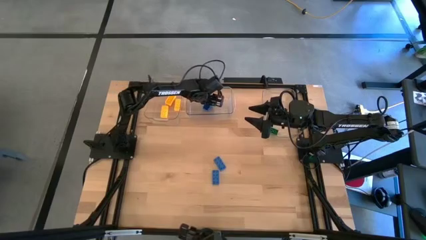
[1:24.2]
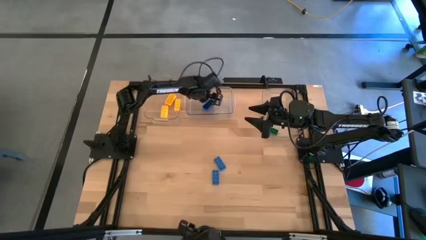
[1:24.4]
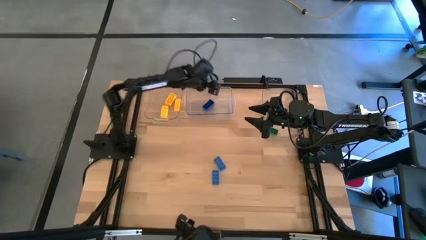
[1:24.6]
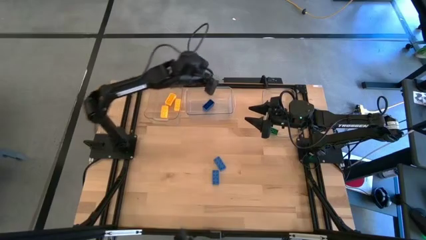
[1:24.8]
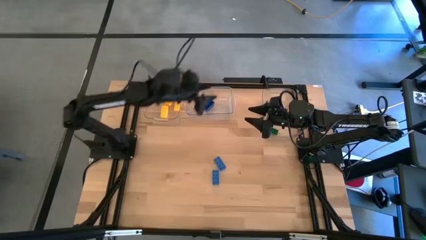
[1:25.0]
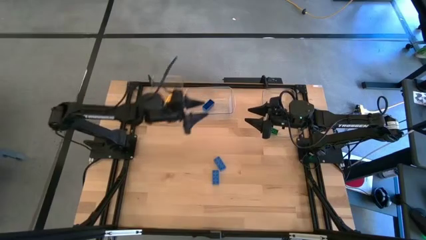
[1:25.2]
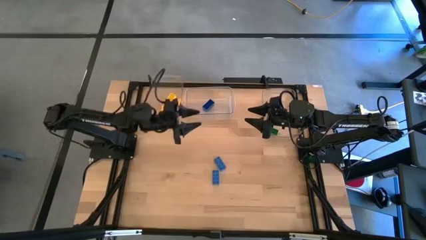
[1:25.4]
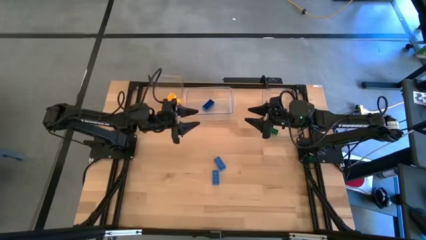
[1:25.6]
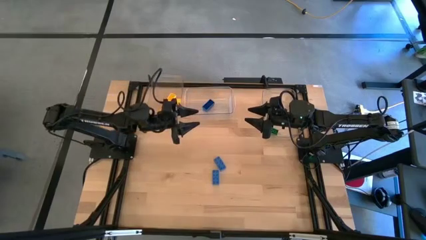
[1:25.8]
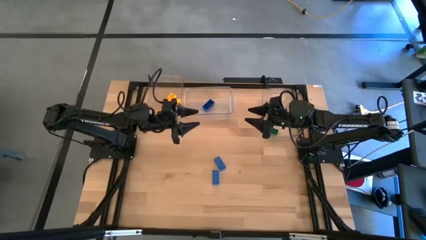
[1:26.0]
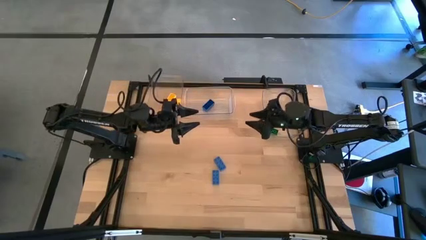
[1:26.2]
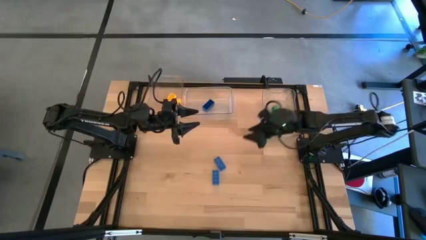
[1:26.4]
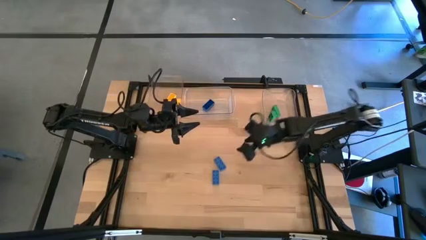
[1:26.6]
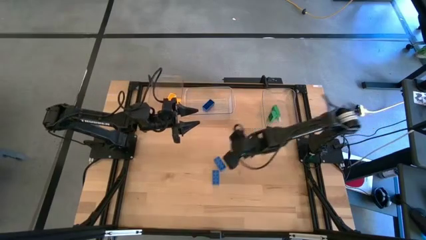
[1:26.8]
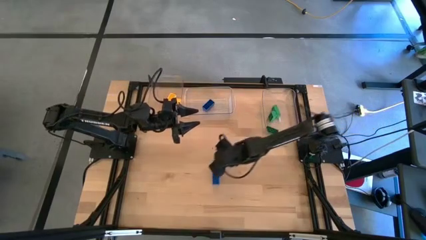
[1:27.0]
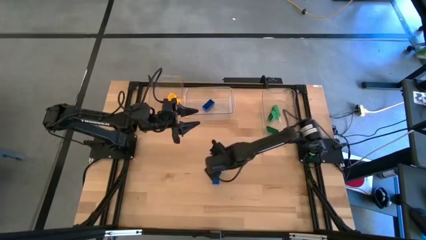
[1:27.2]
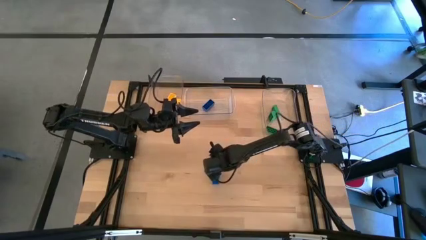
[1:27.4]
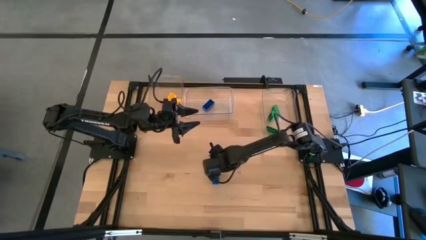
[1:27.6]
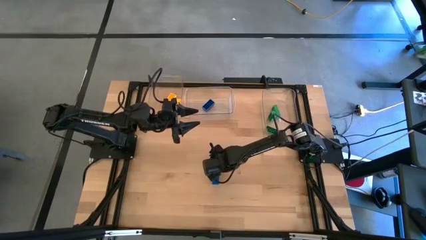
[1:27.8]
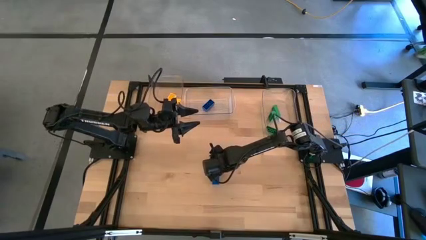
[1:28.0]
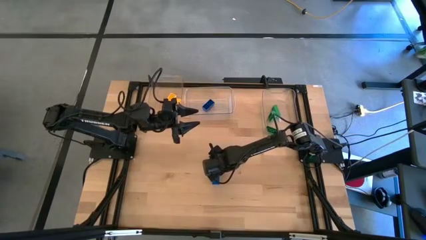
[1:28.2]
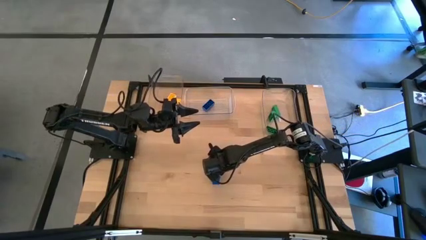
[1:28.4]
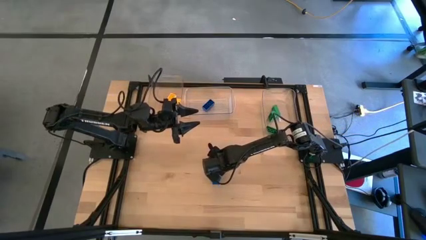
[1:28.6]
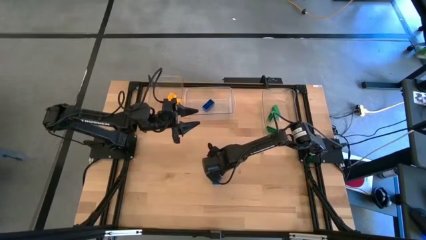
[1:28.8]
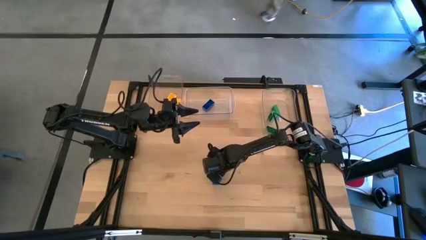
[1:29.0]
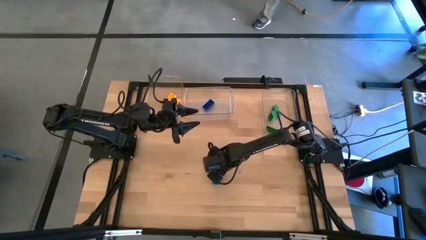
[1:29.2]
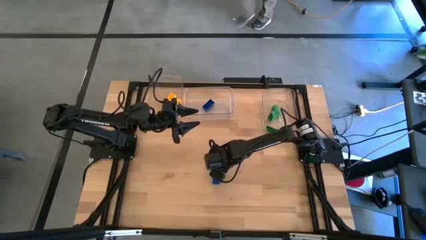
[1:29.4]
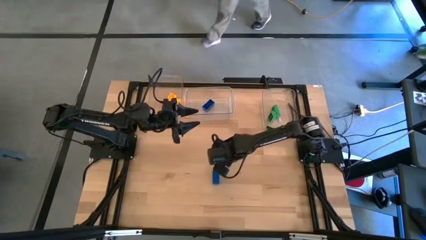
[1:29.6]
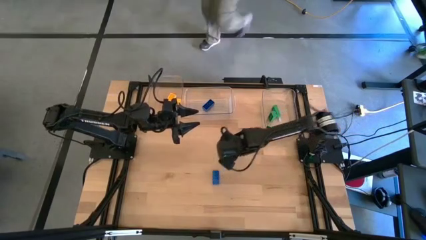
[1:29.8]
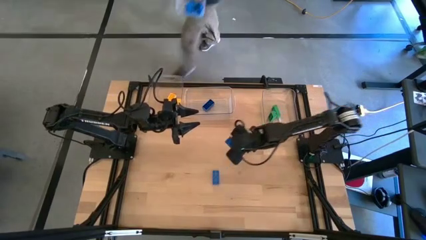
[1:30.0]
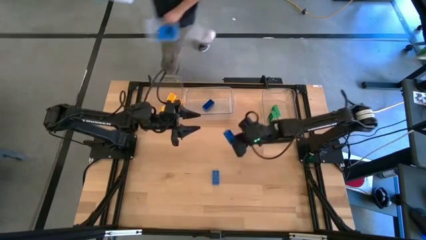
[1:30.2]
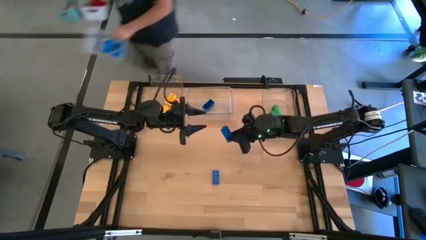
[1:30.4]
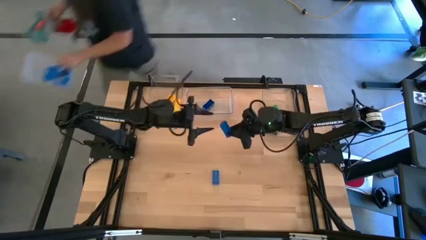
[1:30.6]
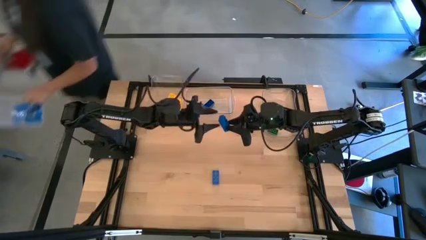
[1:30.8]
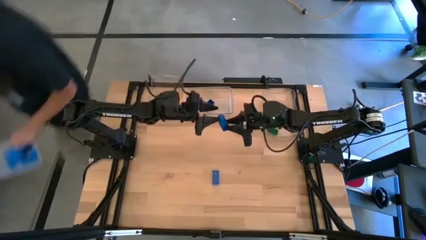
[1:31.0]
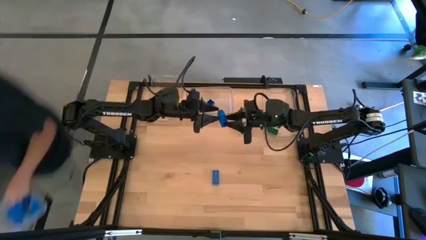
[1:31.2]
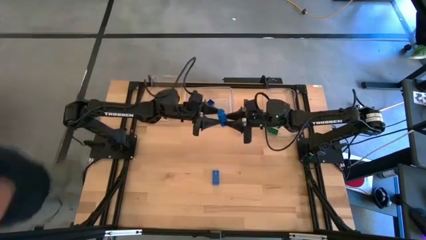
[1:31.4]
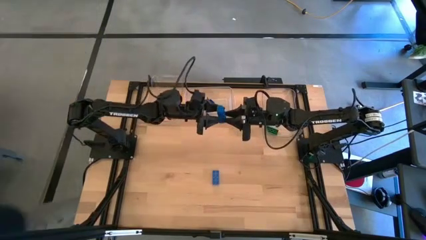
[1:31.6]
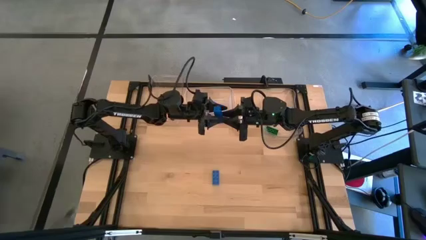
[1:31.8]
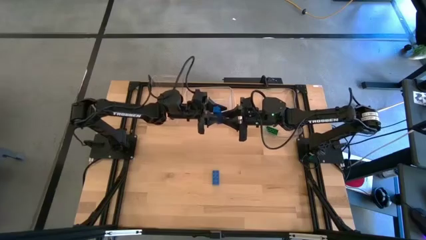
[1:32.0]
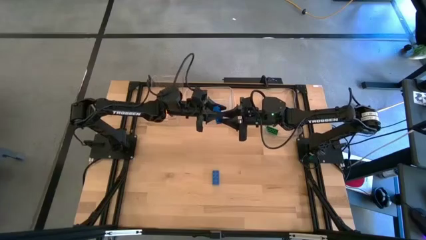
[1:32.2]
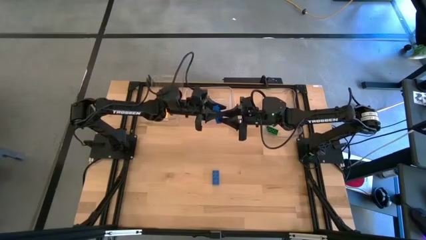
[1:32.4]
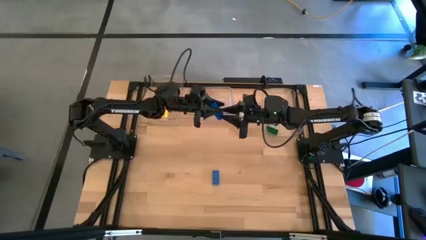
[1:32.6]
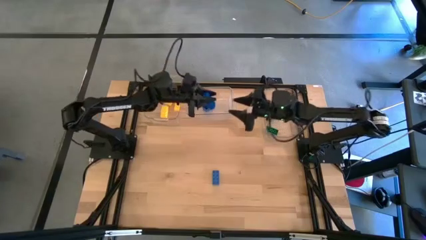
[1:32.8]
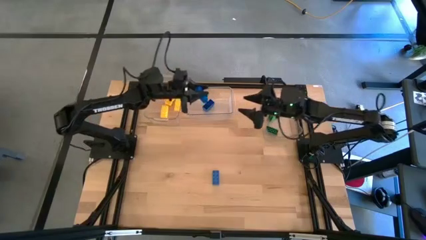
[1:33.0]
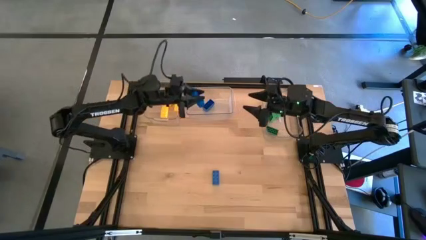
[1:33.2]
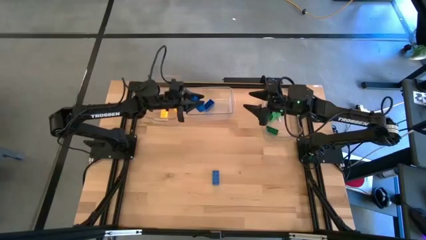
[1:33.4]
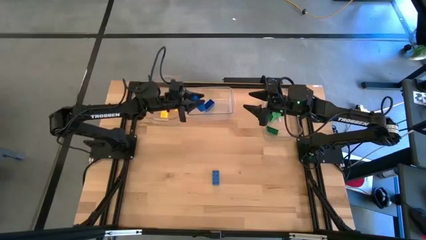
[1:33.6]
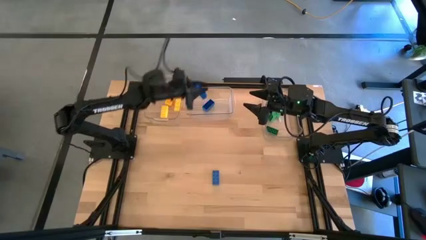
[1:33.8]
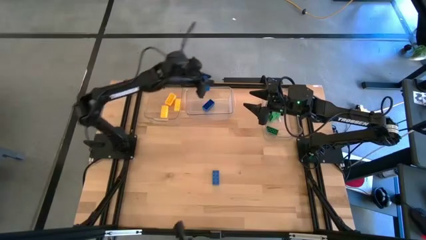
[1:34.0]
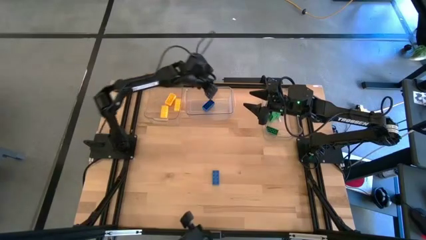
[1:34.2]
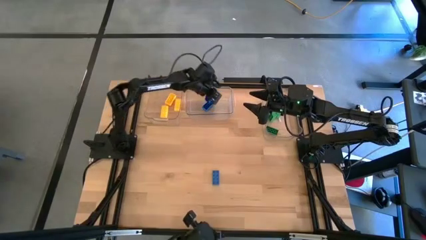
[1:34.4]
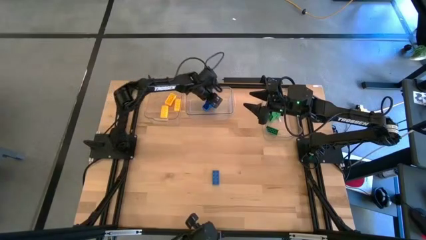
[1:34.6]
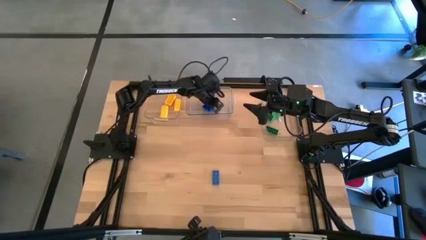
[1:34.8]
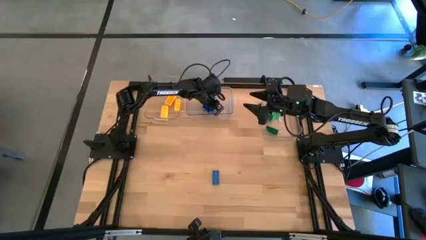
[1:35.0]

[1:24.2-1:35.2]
Task: Sort & place blocks by color
Put the top blue game piece into the middle transparent bin

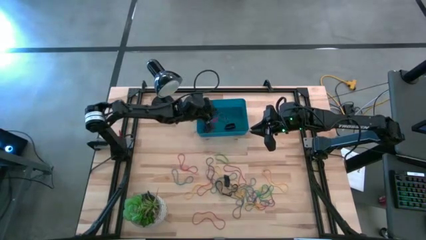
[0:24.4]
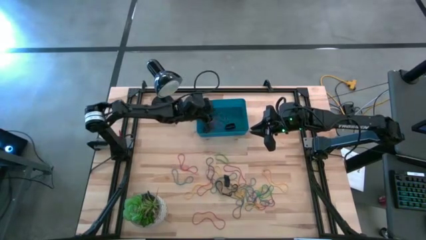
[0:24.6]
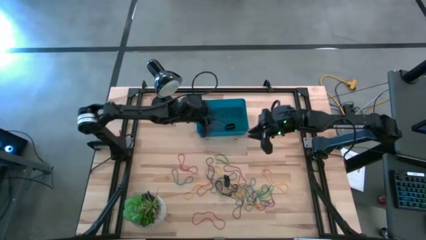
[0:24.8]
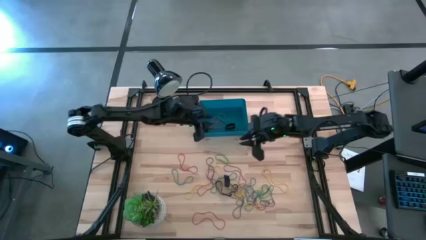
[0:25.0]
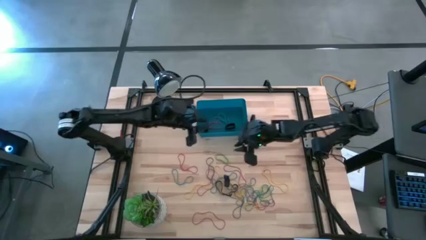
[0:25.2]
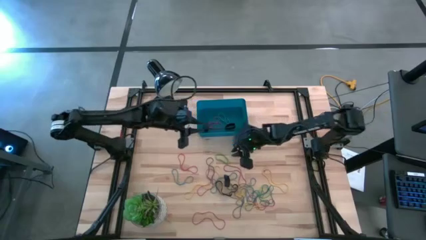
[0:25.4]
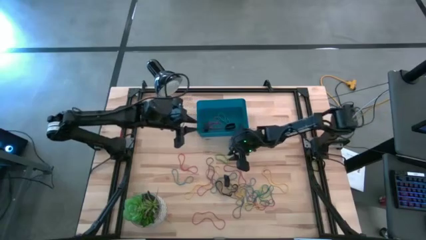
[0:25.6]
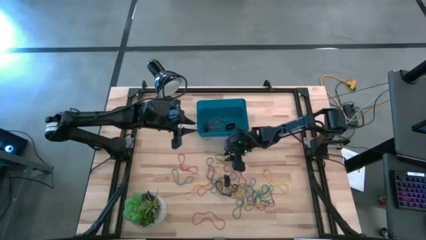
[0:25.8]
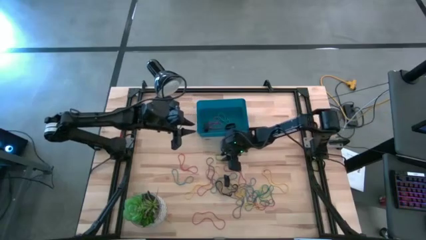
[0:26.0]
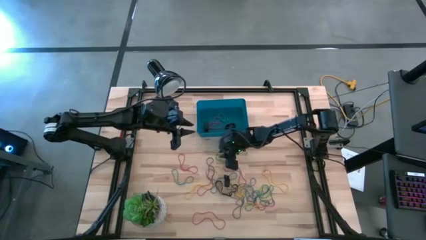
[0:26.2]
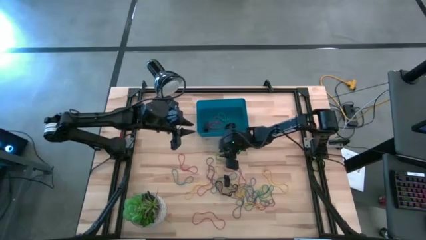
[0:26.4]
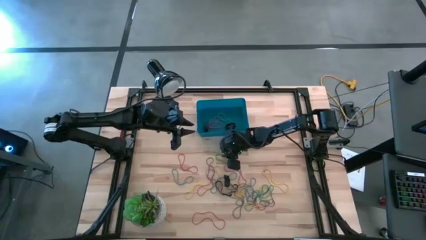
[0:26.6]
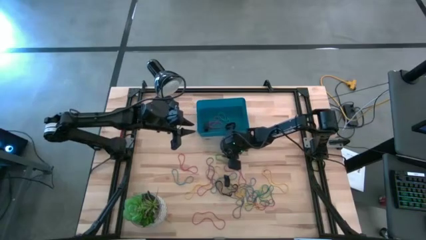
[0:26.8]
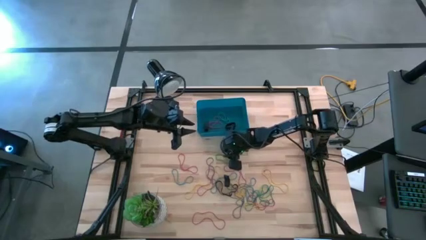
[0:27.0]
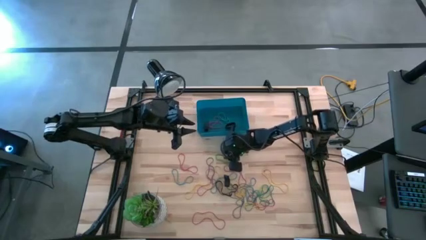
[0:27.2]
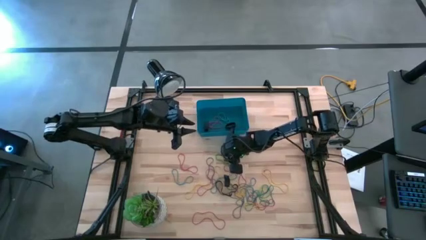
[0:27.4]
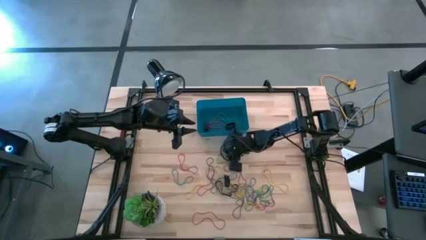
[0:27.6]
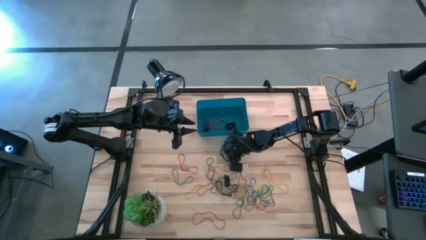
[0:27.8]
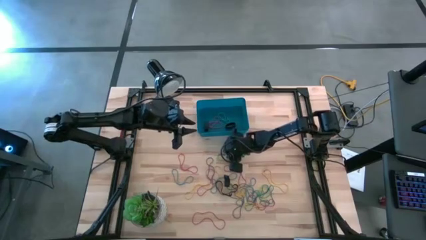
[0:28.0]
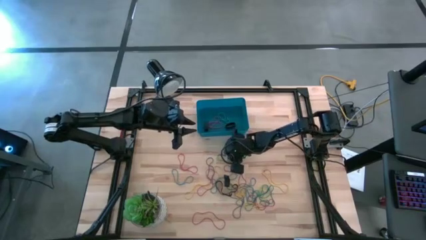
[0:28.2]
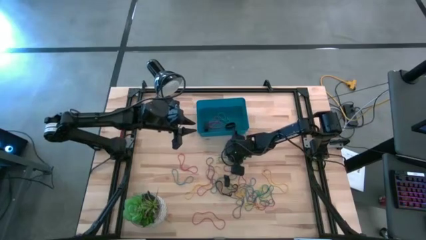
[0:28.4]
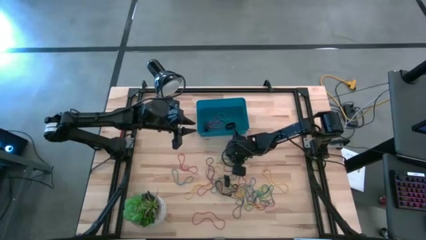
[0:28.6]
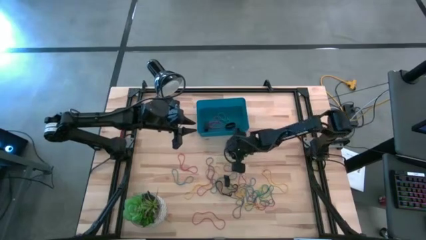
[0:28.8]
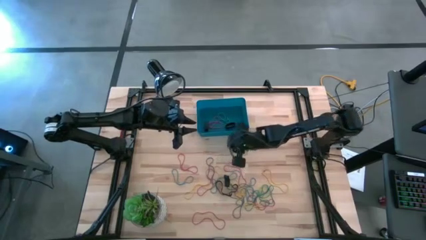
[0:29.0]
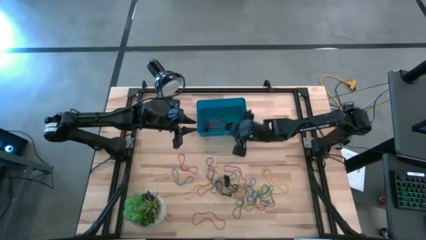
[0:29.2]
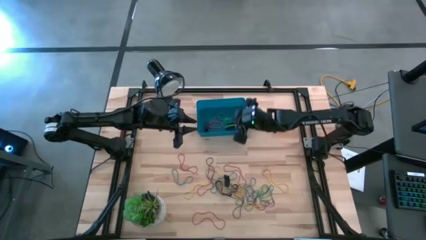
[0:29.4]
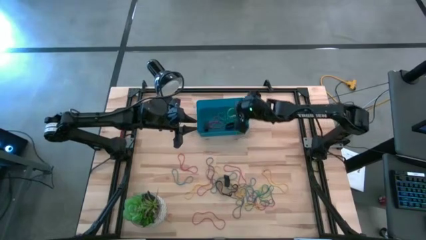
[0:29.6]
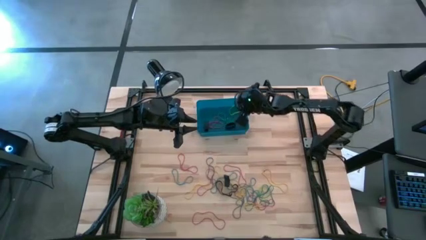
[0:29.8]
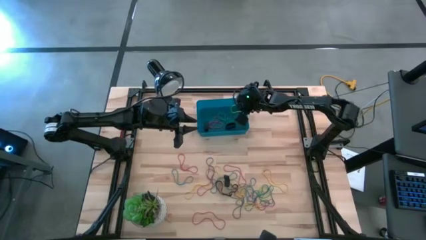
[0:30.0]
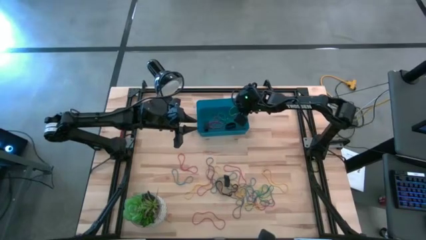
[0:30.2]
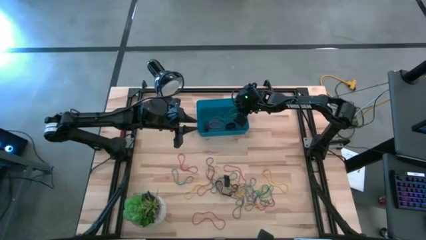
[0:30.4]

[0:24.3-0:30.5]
Task: Pick and place rubber bands into bin
Put the green rubber band into the blue bin
